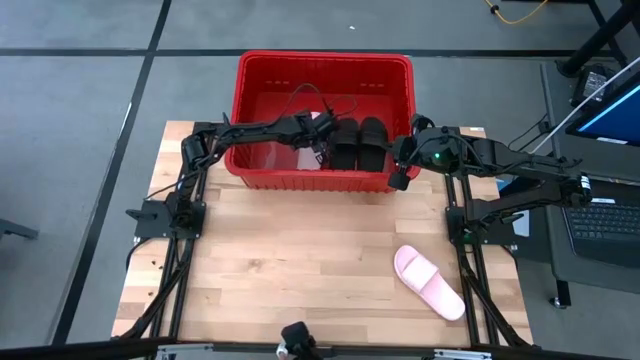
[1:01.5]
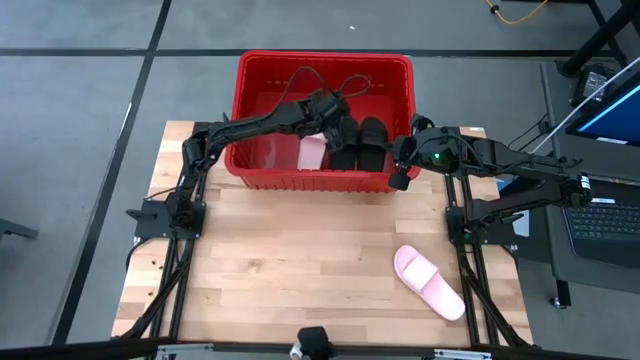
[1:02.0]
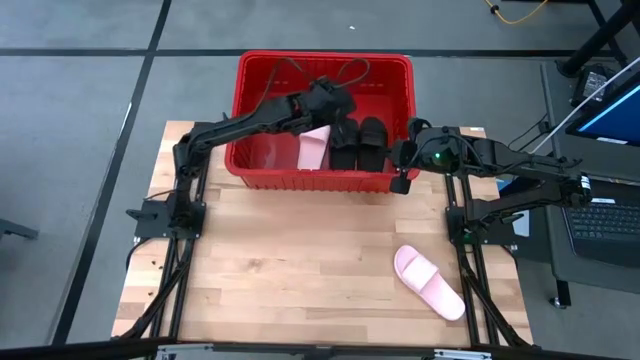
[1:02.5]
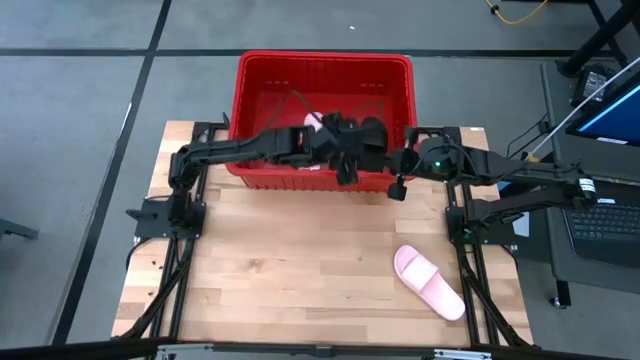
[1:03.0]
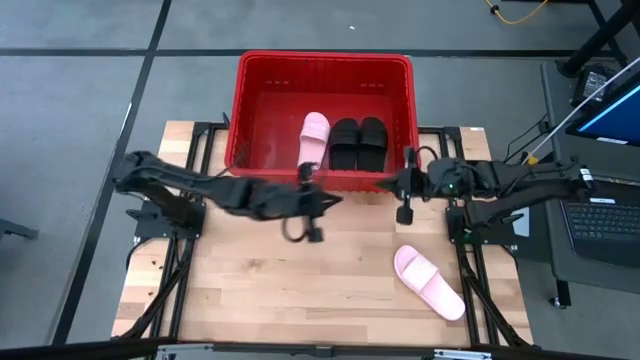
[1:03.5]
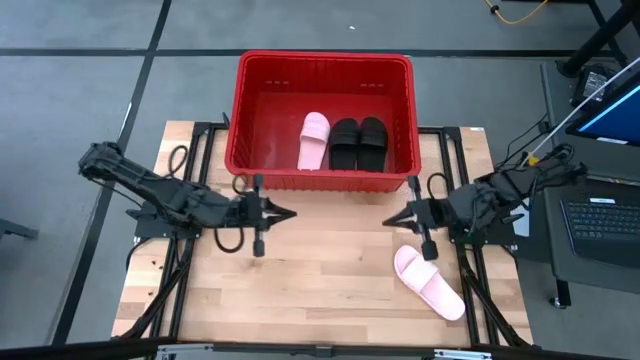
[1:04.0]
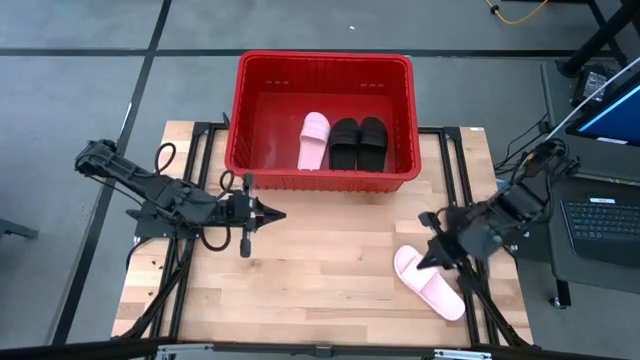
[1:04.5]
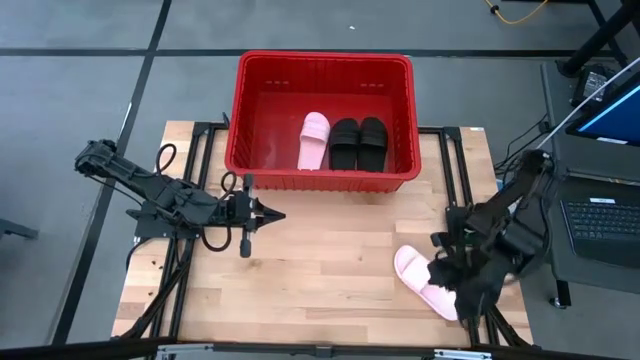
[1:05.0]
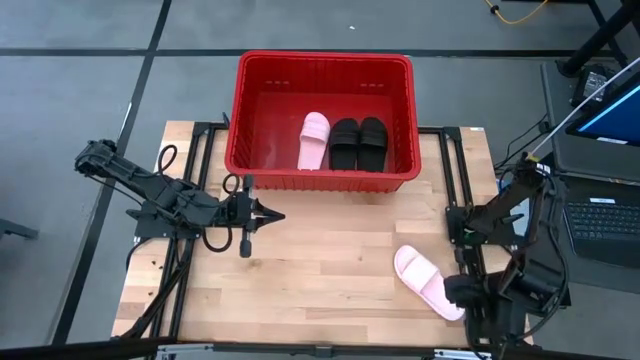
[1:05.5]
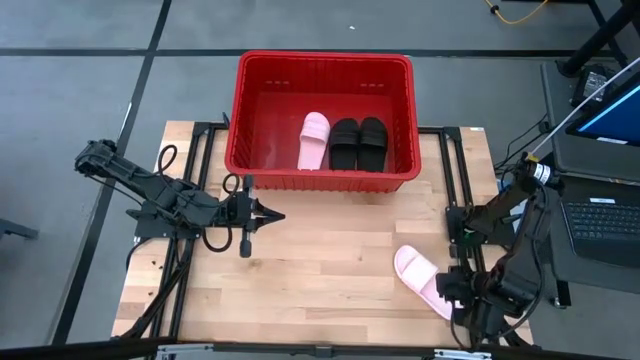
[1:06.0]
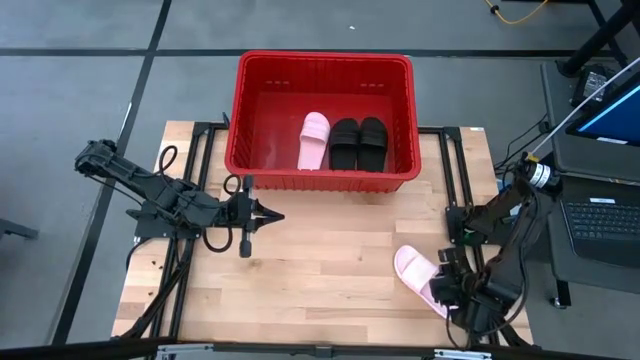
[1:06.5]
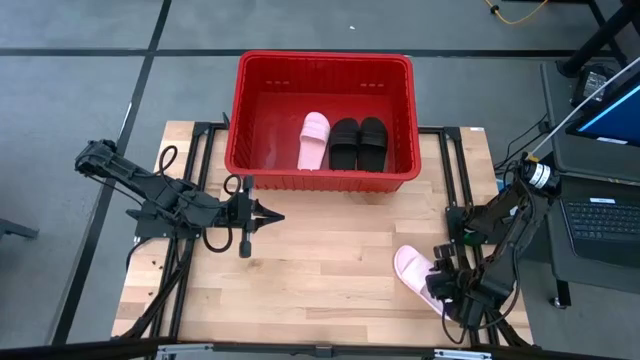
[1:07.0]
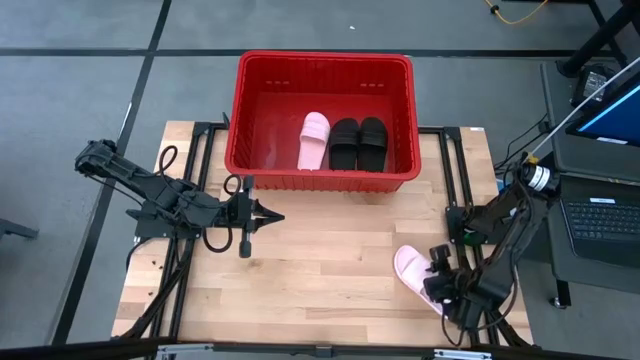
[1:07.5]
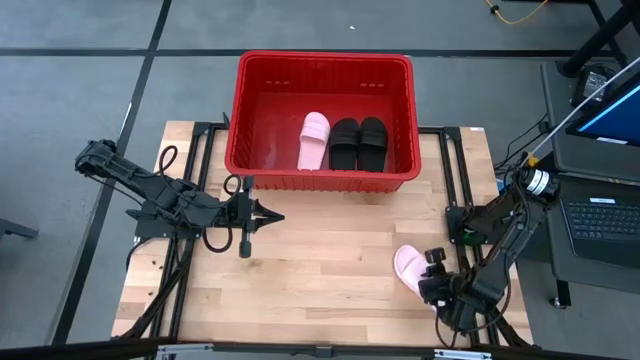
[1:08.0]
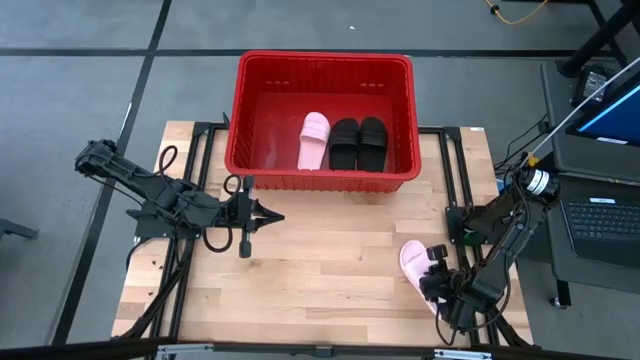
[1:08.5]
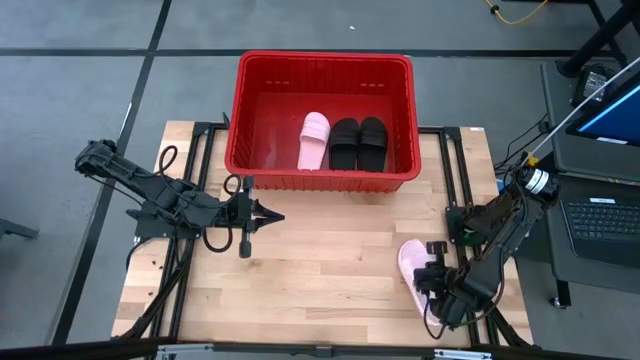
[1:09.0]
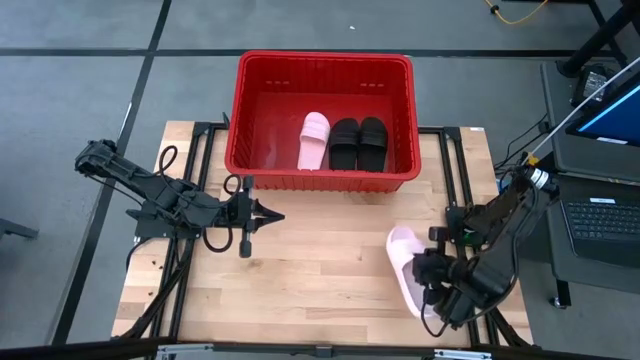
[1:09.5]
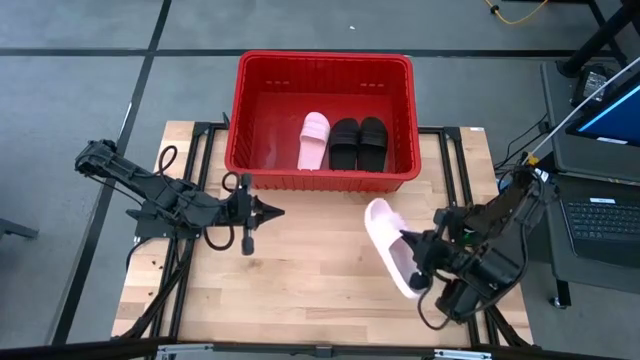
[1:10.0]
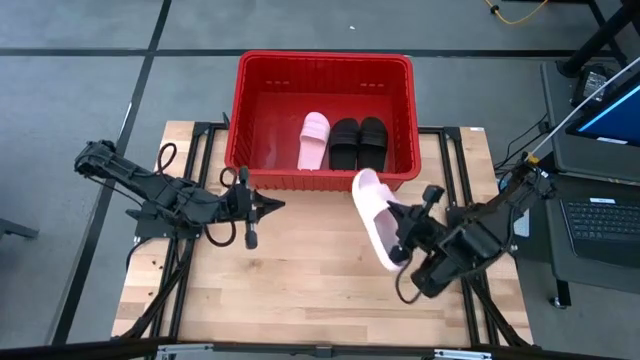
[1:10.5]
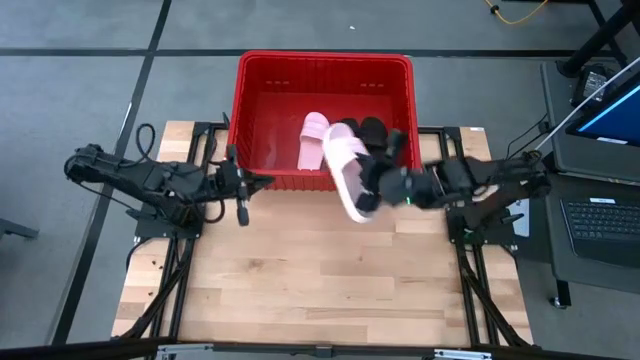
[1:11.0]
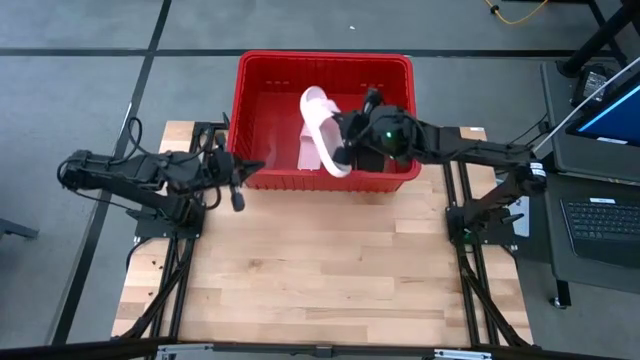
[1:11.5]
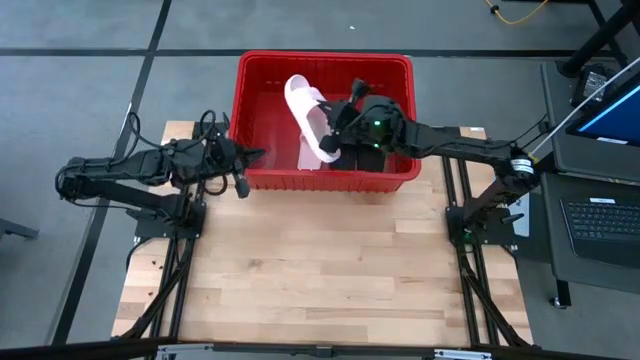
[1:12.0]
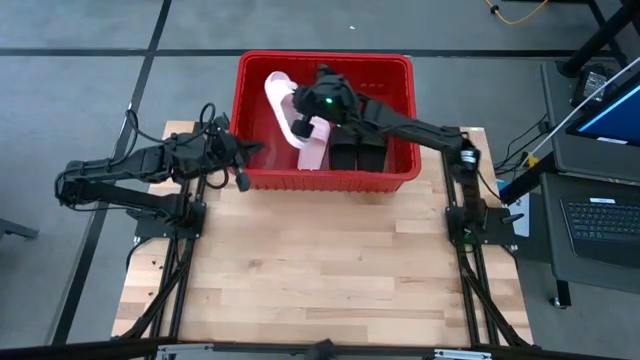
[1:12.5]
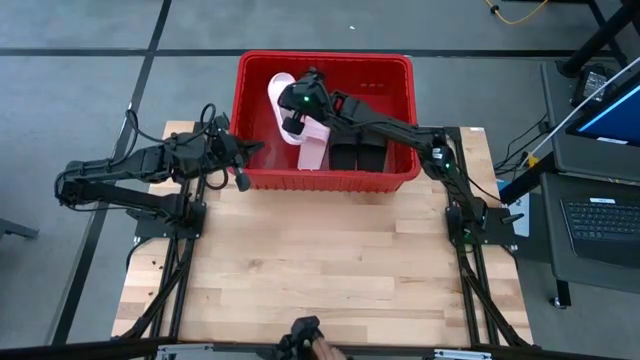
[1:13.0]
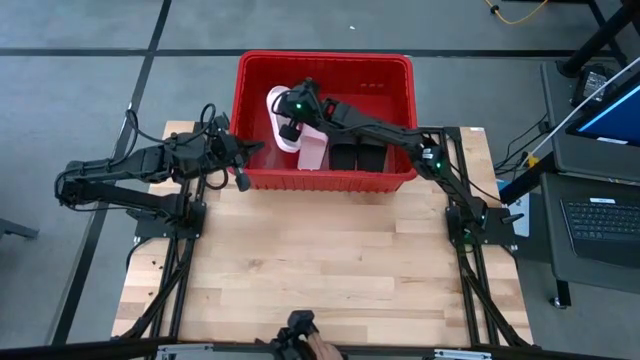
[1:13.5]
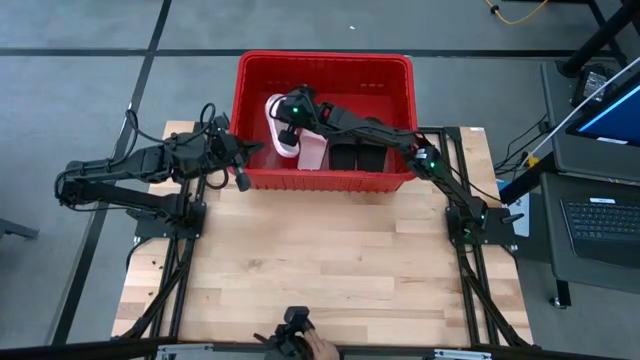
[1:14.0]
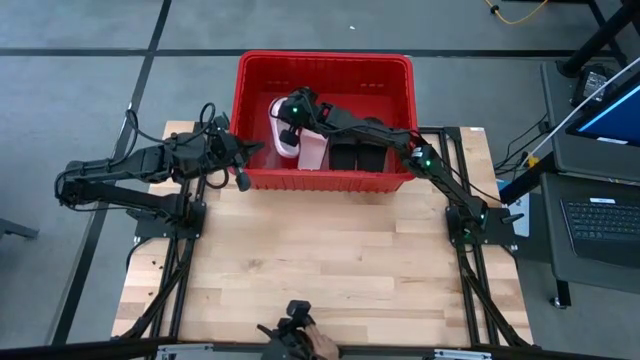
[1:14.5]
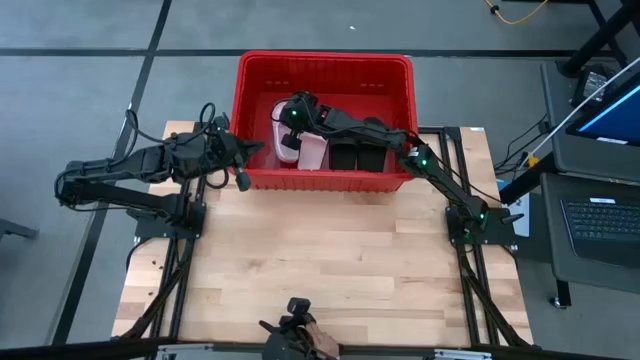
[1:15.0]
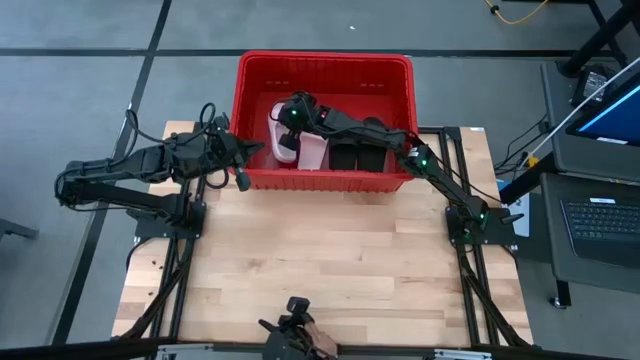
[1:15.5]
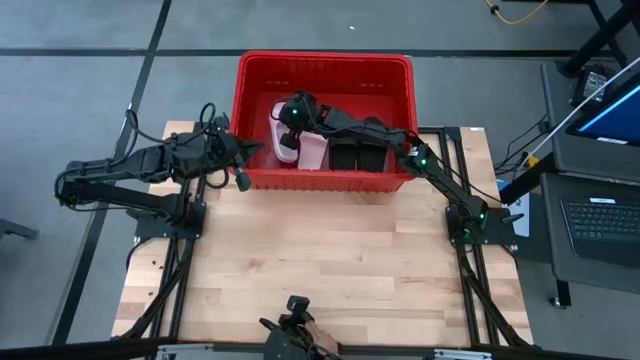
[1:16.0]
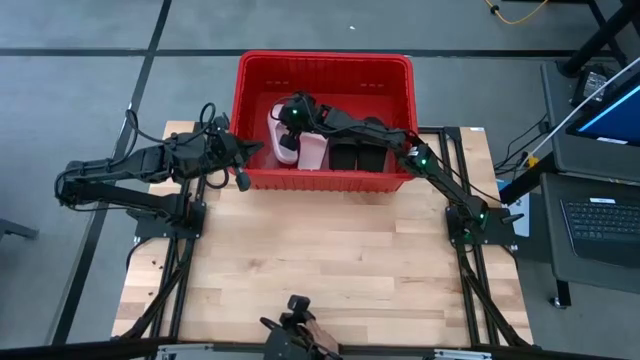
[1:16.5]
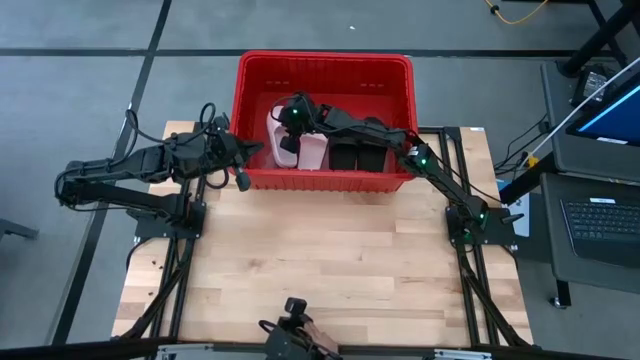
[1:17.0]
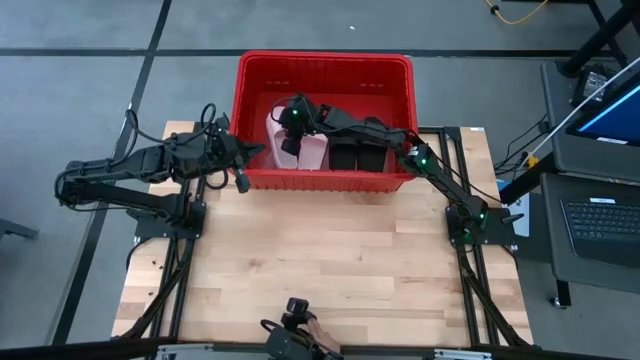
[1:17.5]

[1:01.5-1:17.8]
Task: Pick and place slides into bin
Put the pink slide into the red bin

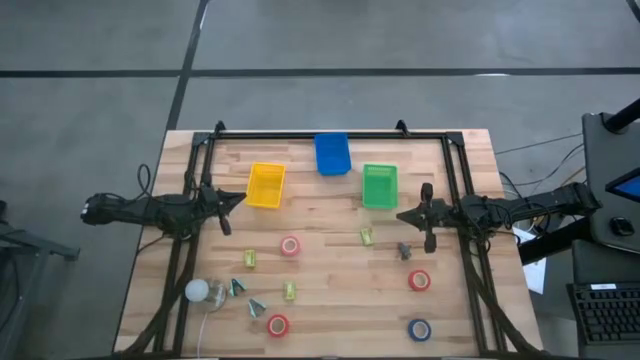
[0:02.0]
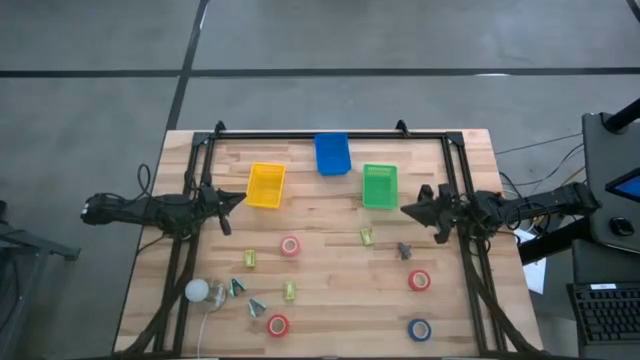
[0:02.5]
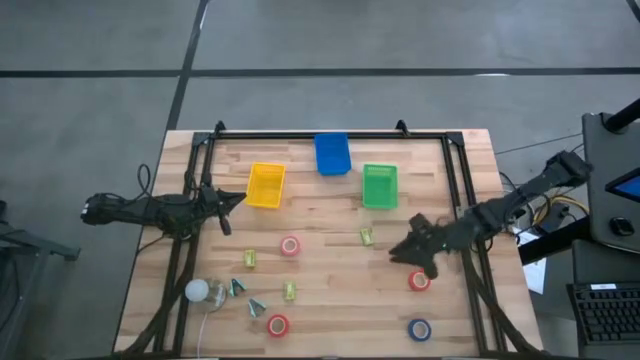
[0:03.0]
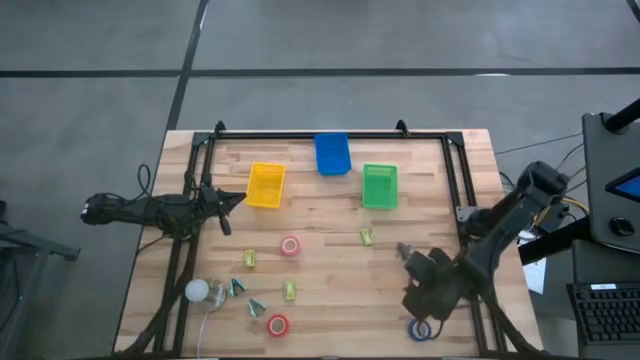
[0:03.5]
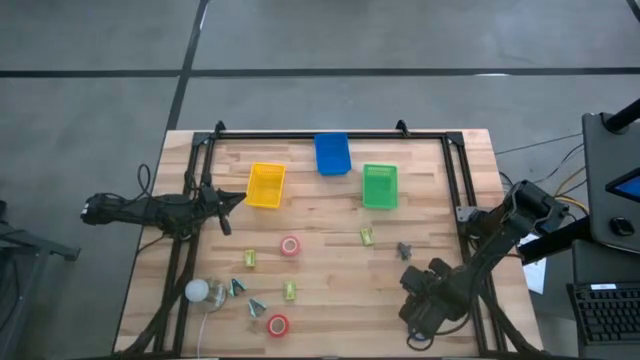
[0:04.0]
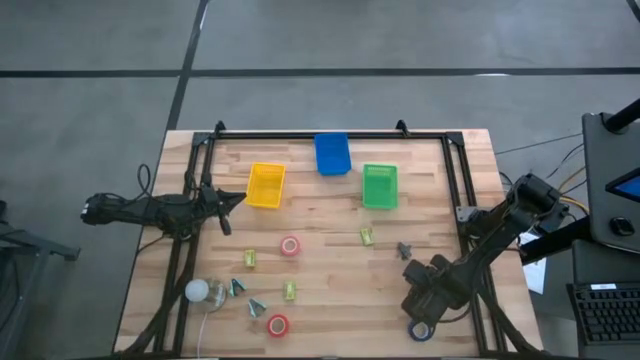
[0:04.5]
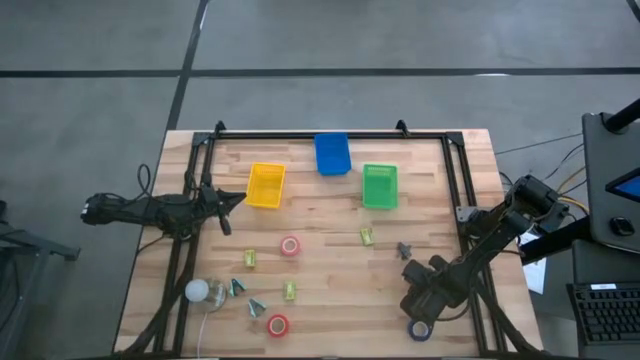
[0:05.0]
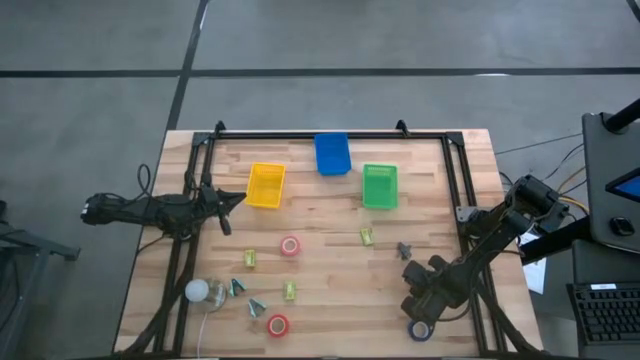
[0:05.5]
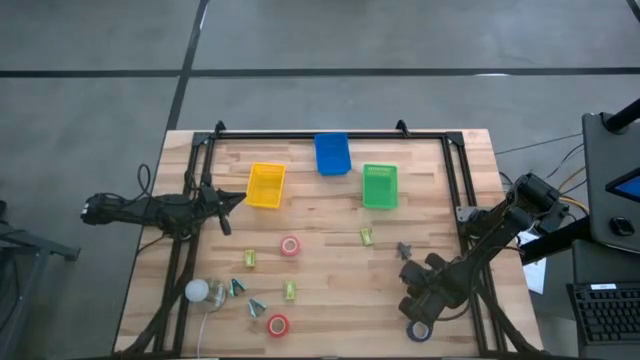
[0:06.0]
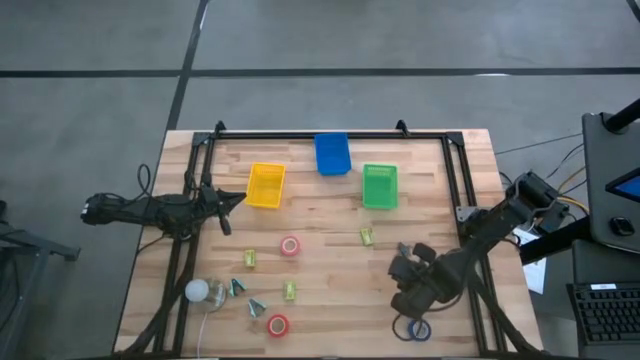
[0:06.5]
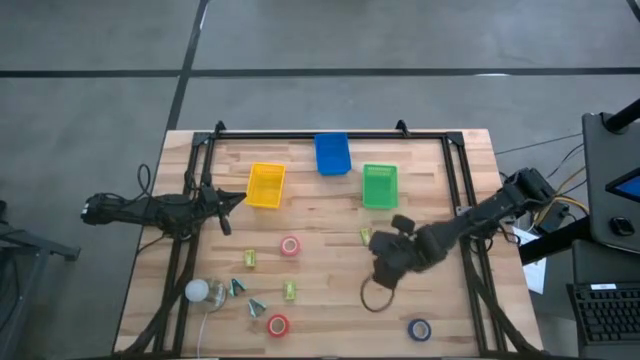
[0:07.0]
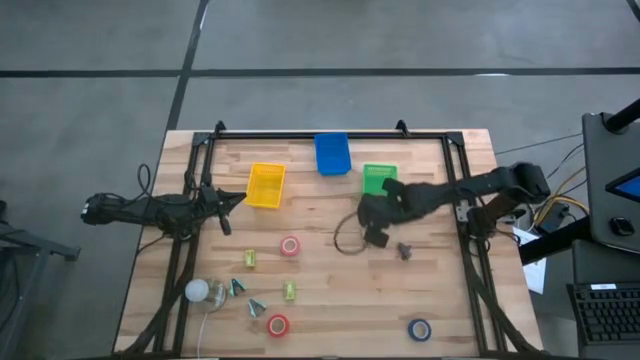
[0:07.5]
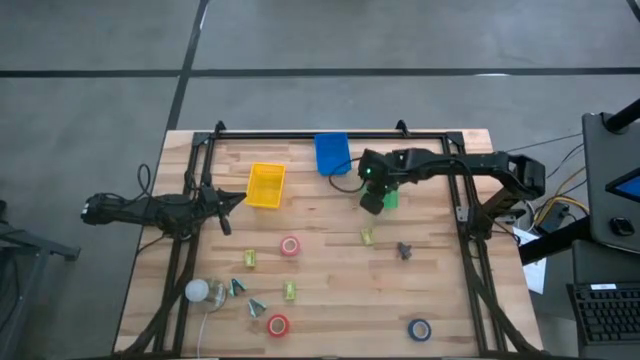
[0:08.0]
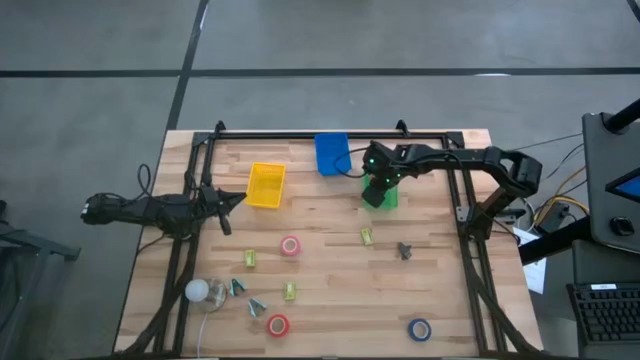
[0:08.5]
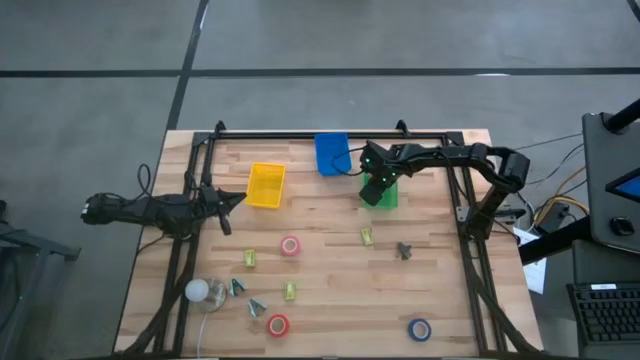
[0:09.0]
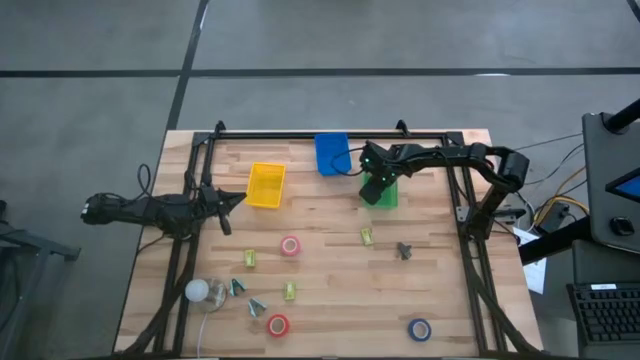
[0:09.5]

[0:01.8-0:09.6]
Task: Pick and place Stapler, Stapler remover, tape
Put the top red tape into the green basket
